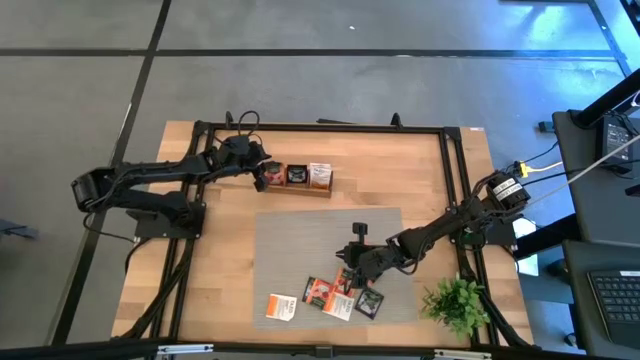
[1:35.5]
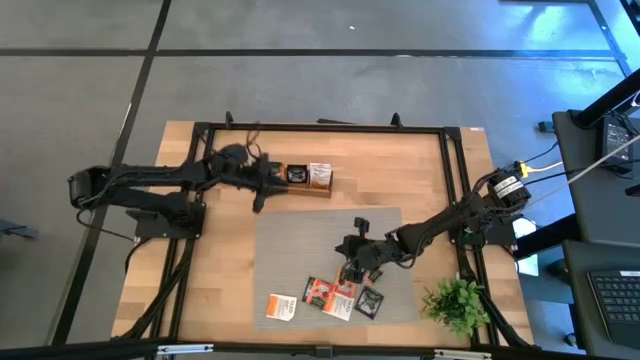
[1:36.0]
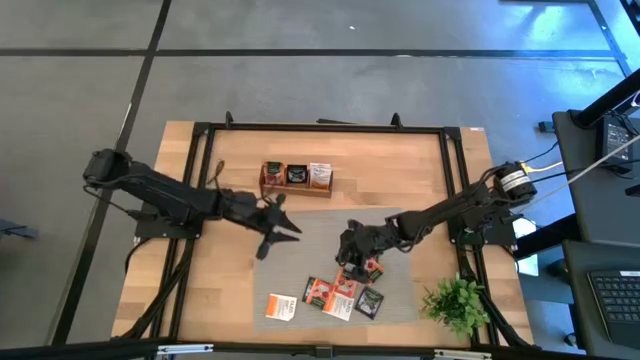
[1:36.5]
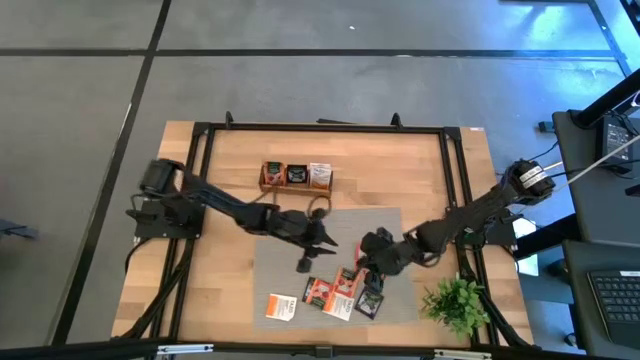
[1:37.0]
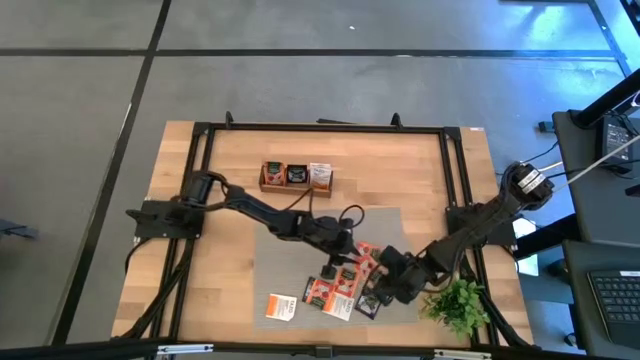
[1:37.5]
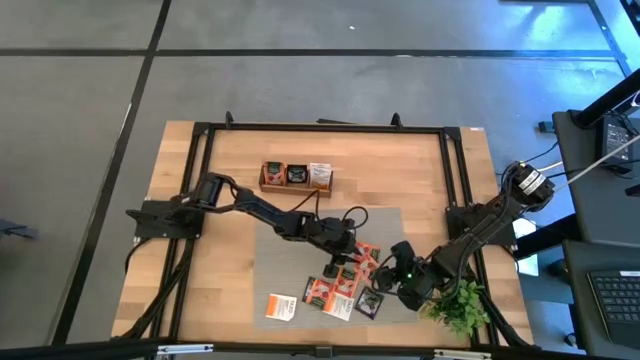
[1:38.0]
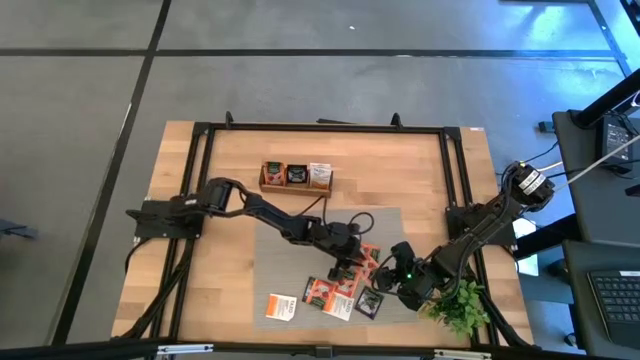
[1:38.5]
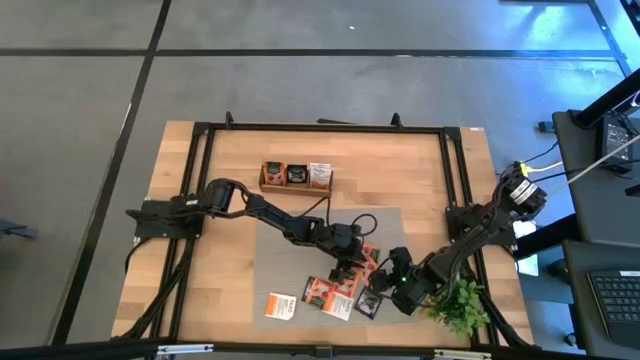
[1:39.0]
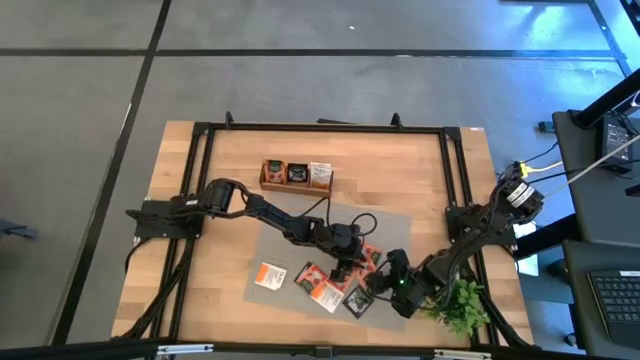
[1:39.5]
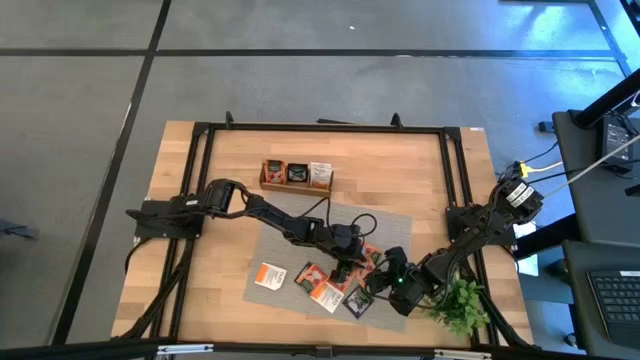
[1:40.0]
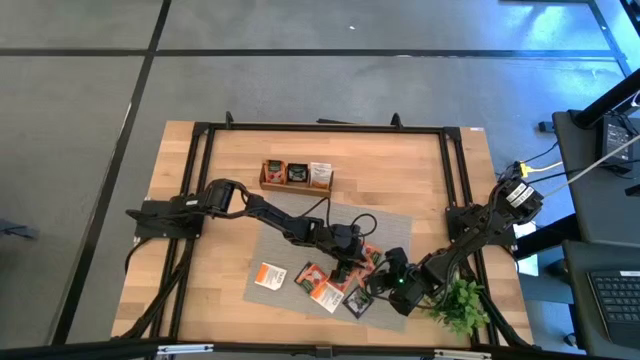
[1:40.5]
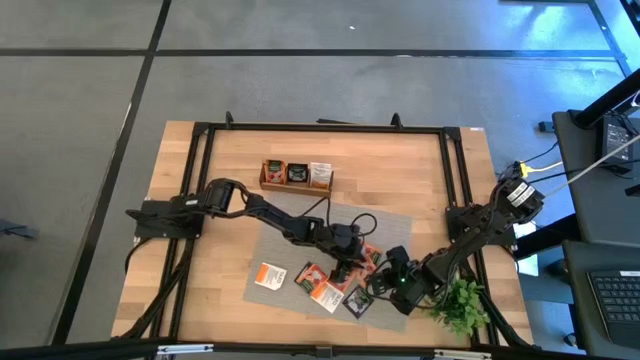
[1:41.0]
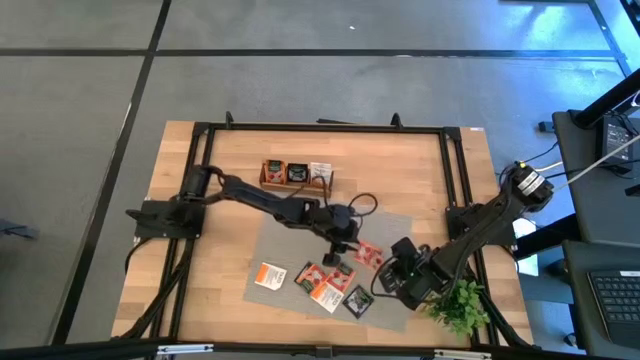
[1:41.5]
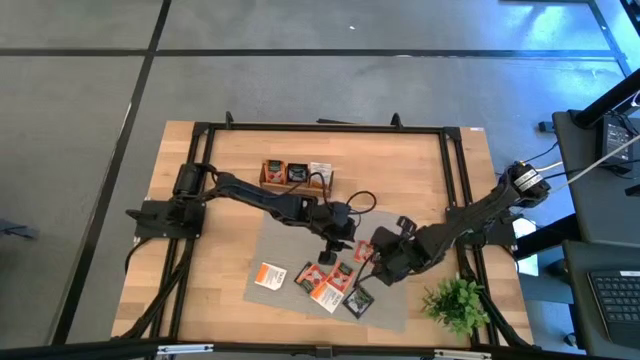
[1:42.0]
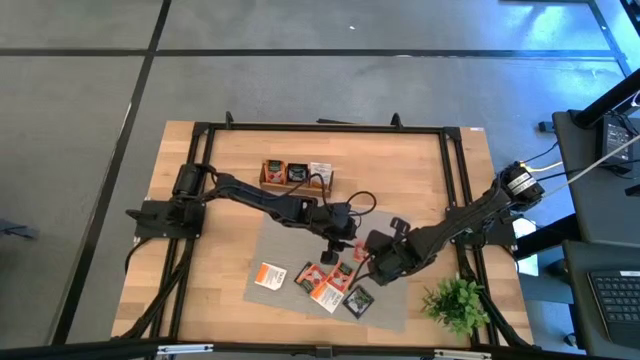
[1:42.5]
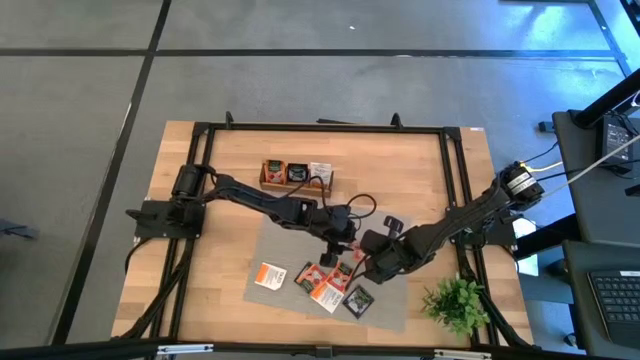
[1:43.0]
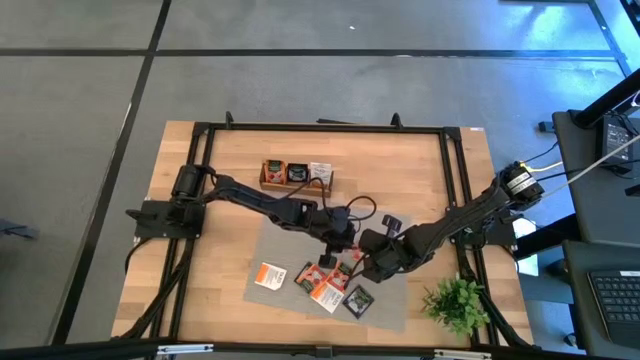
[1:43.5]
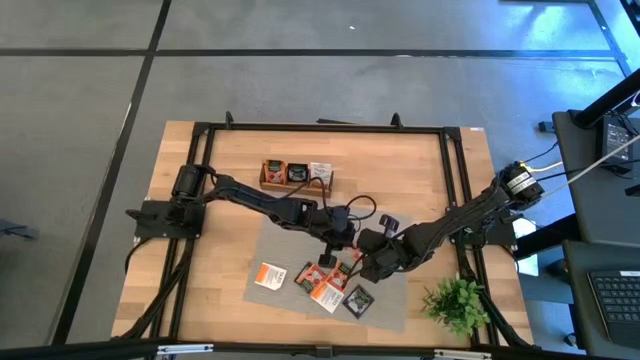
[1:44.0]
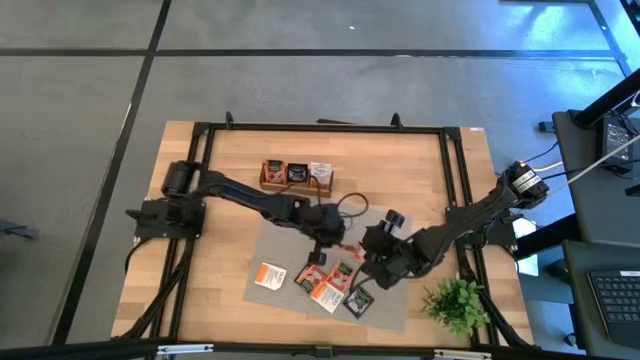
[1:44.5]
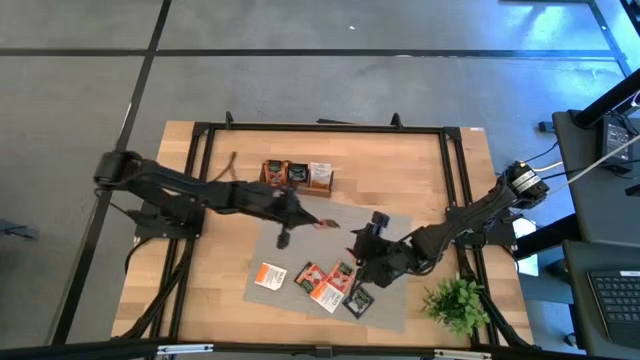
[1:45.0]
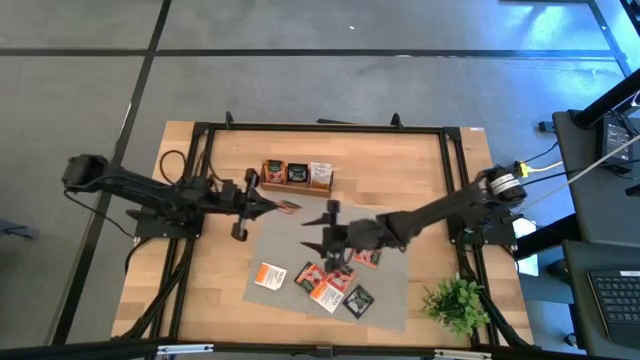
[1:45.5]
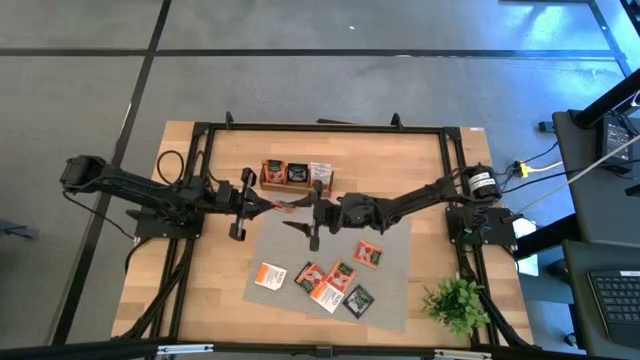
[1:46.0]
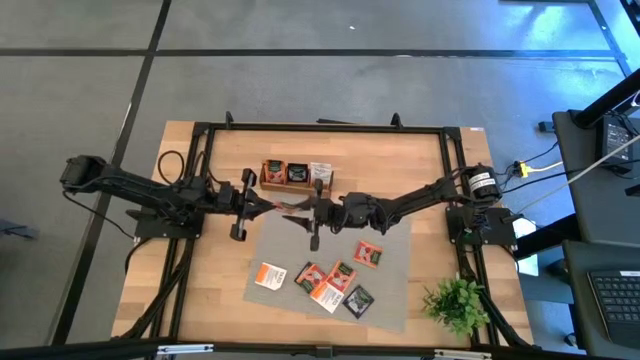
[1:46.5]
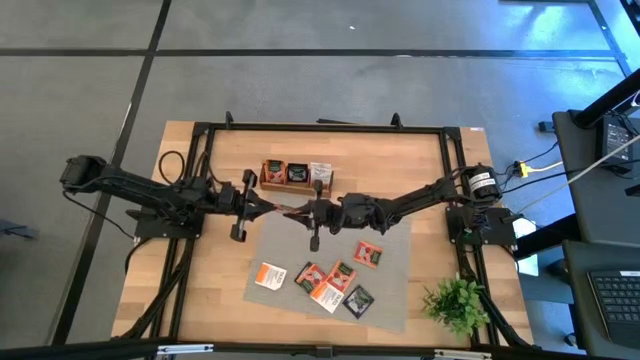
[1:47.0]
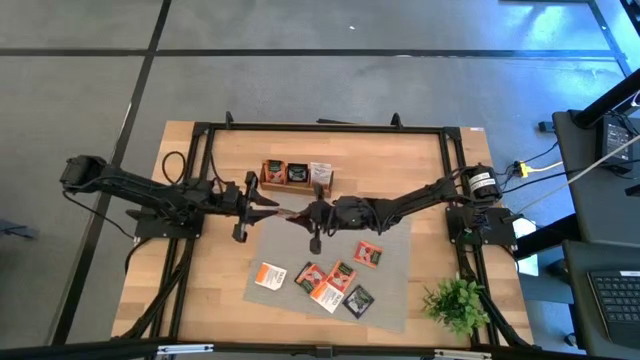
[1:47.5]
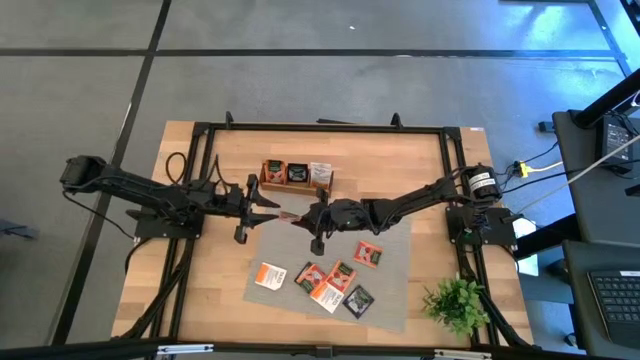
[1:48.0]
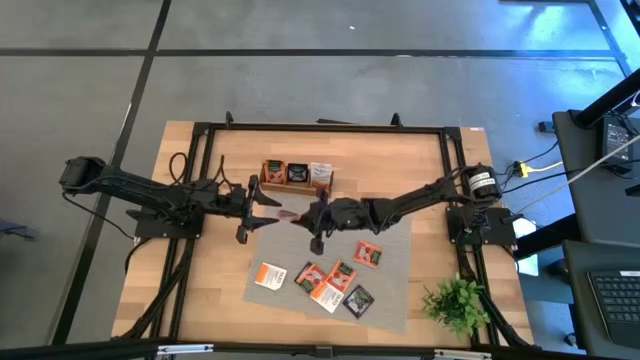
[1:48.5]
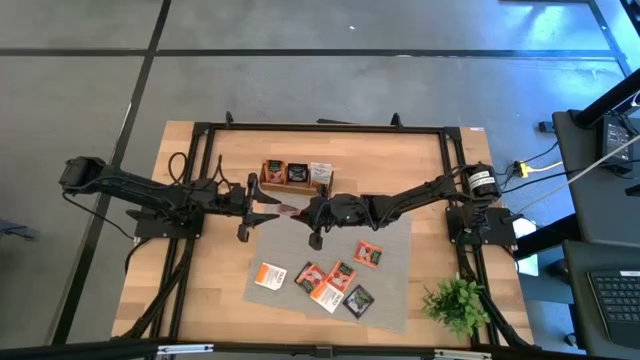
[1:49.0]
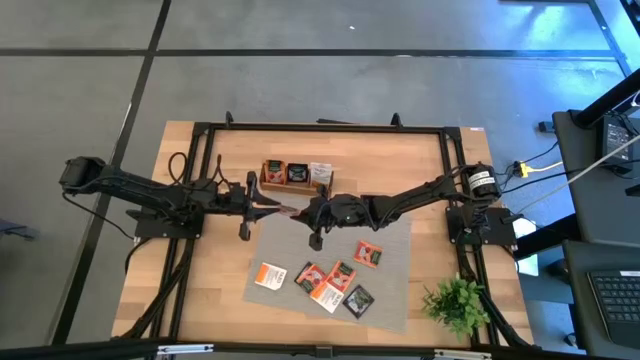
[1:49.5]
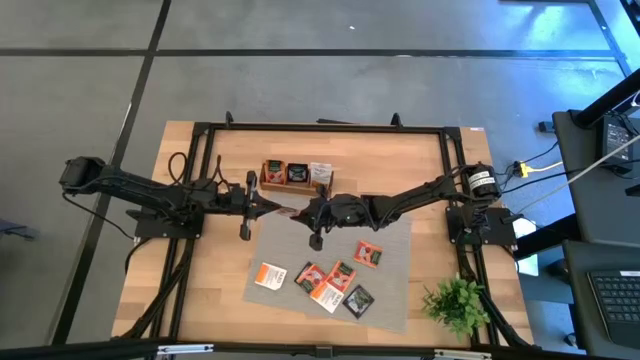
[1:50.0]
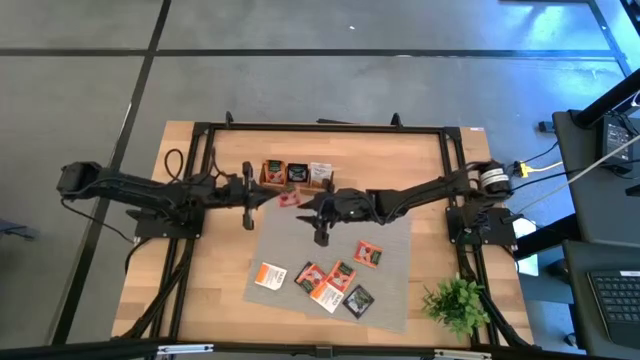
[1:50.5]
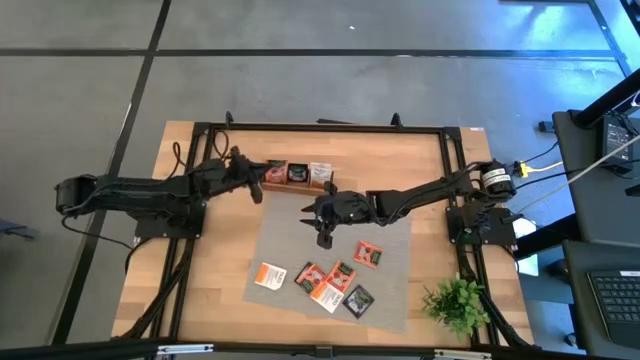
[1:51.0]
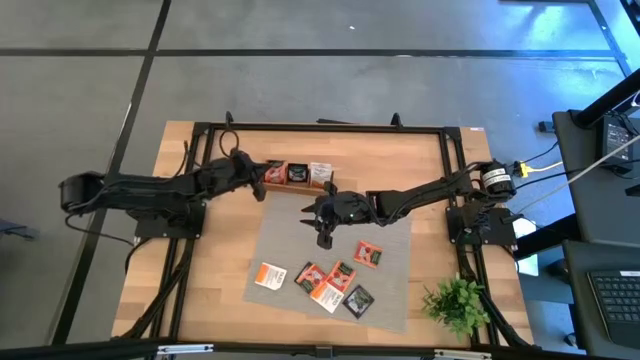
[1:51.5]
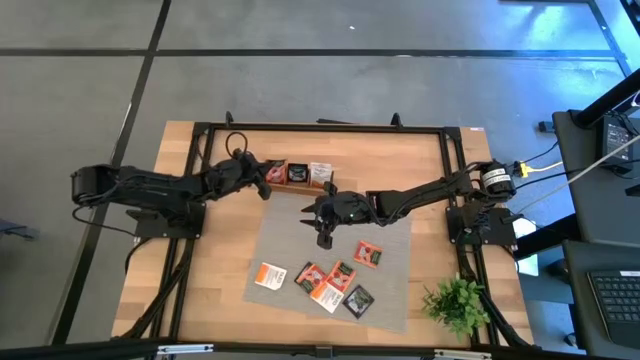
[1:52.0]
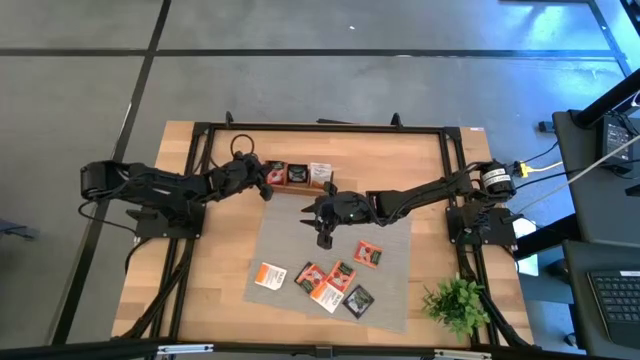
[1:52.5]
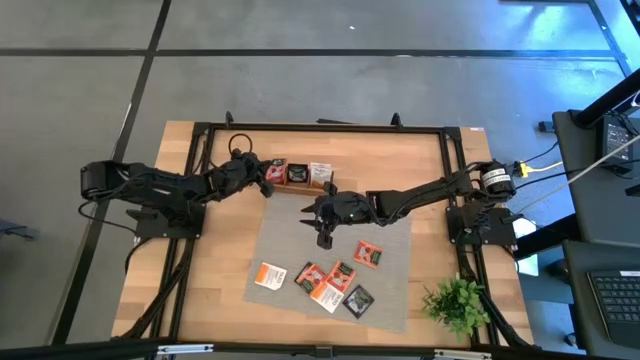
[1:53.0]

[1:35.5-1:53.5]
Task: Pick & Place Tea
Put the orange tea bag into the left section of the wooden organizer

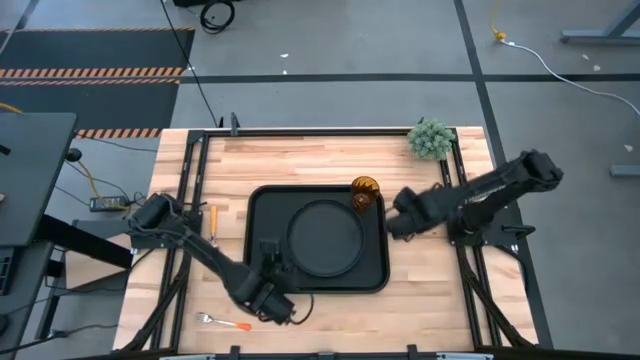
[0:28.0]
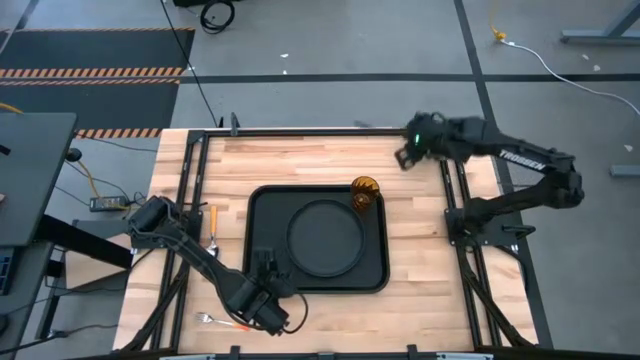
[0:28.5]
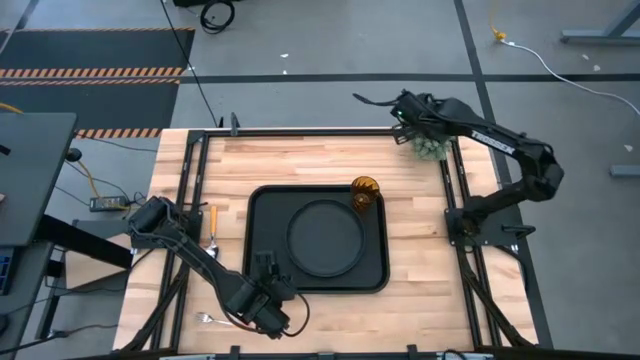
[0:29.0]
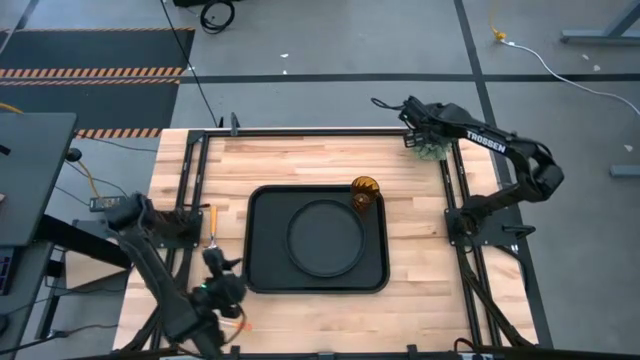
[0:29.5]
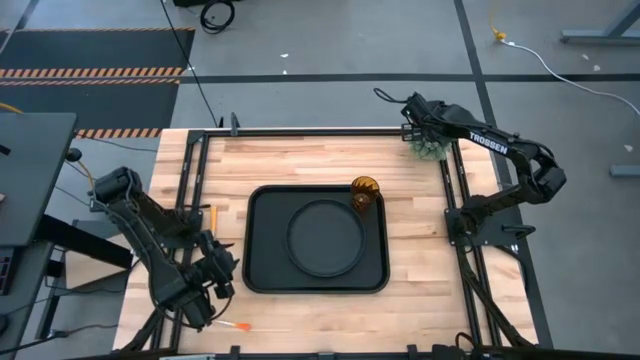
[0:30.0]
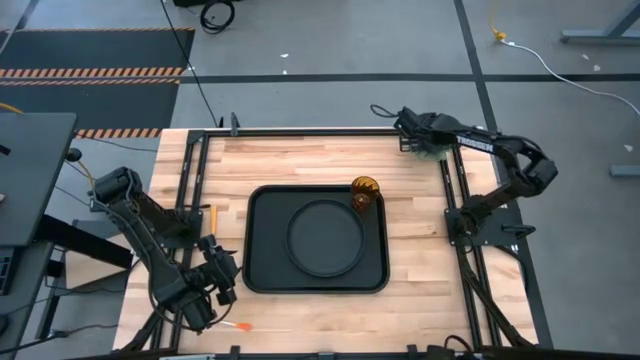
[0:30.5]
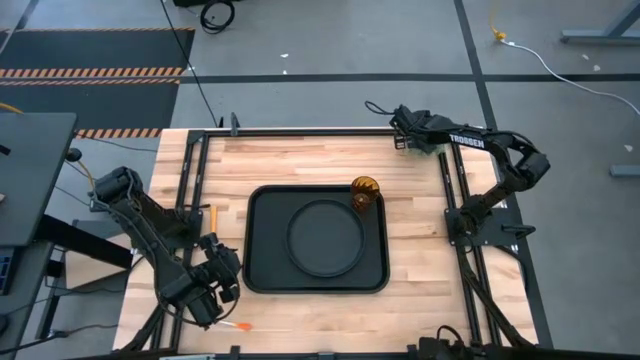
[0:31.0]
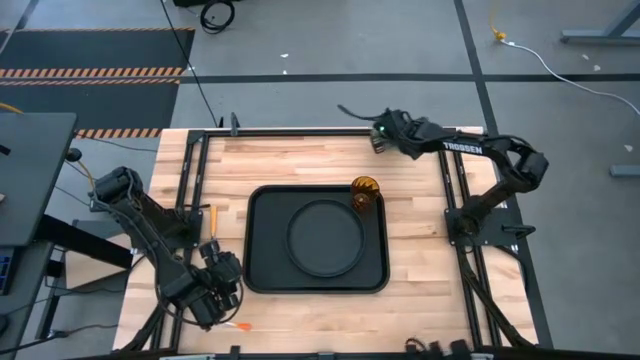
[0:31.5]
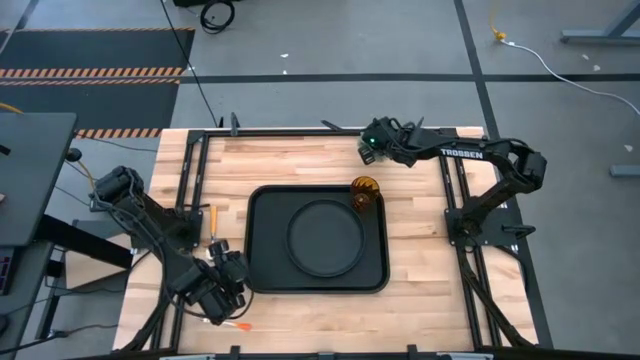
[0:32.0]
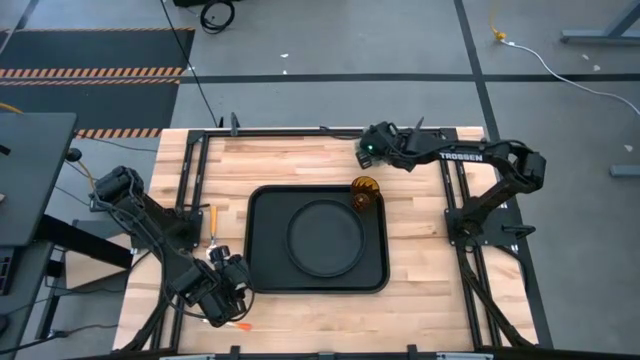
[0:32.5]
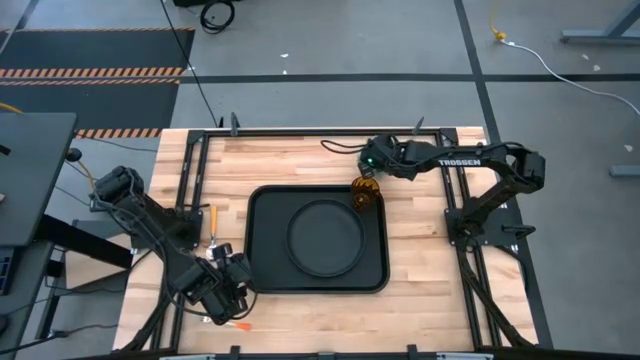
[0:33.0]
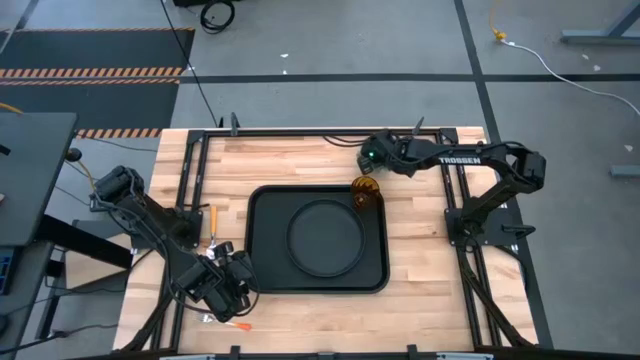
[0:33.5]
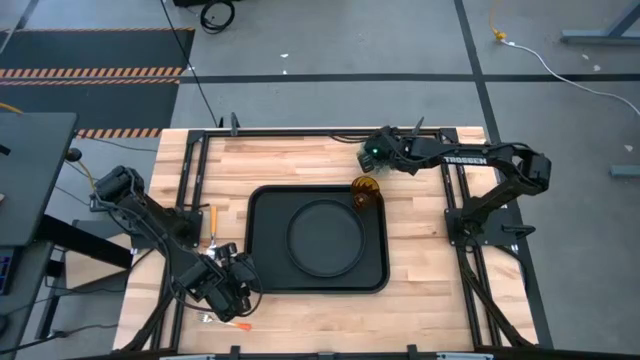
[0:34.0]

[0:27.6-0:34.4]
Task: Pick and place plate/cup/fork/spoon on tray
Move the white flower pot to the top center of the table
